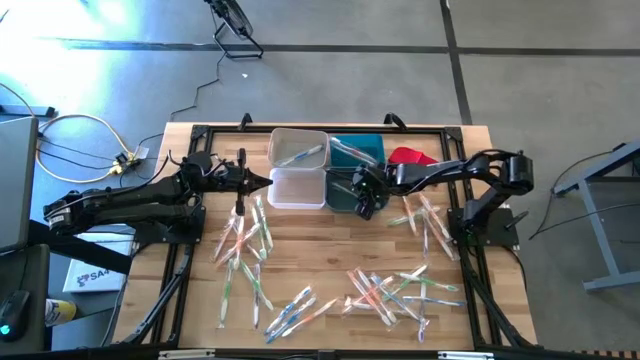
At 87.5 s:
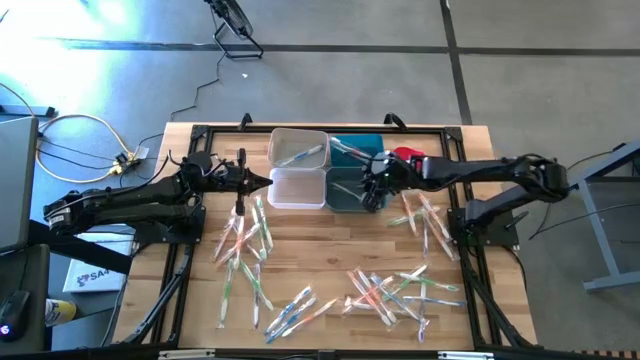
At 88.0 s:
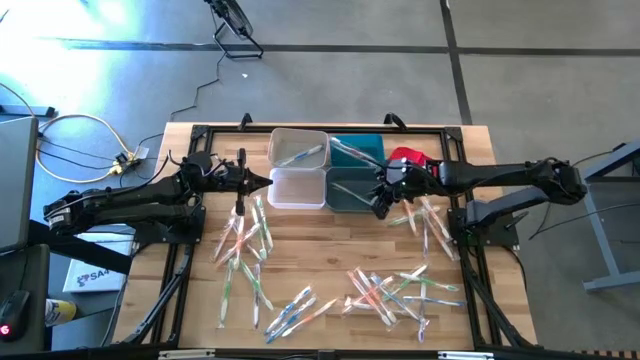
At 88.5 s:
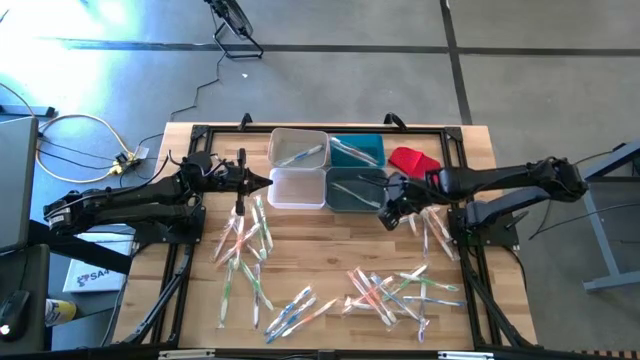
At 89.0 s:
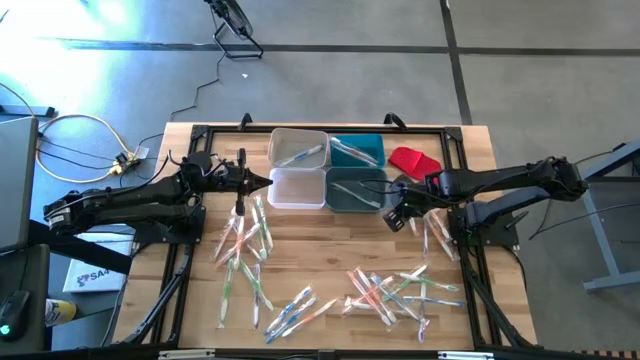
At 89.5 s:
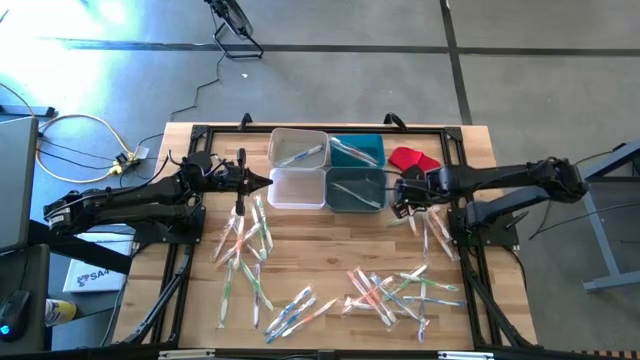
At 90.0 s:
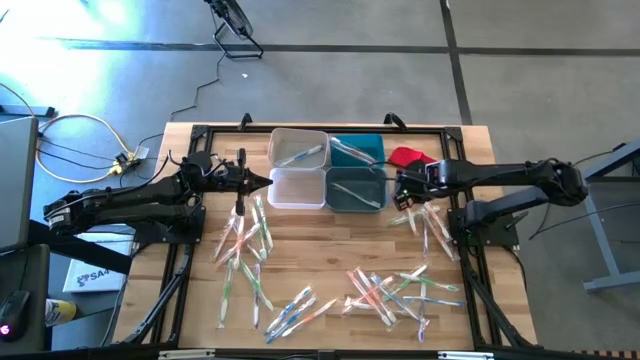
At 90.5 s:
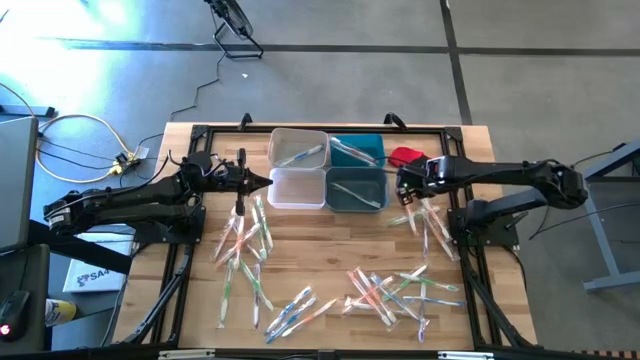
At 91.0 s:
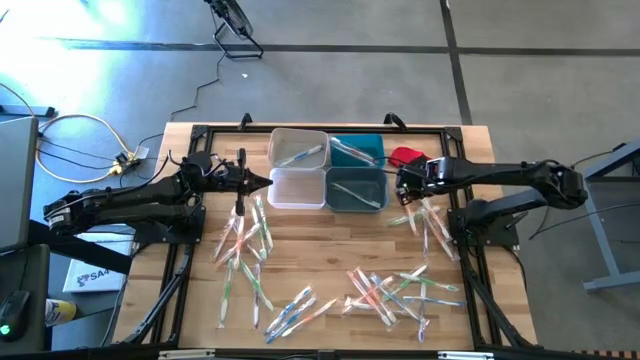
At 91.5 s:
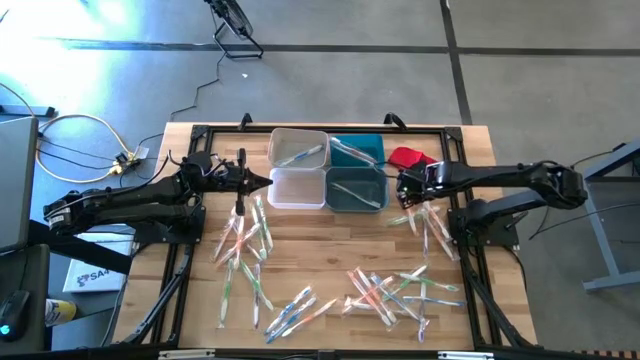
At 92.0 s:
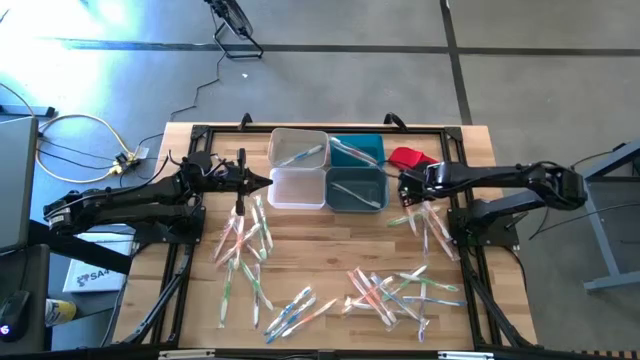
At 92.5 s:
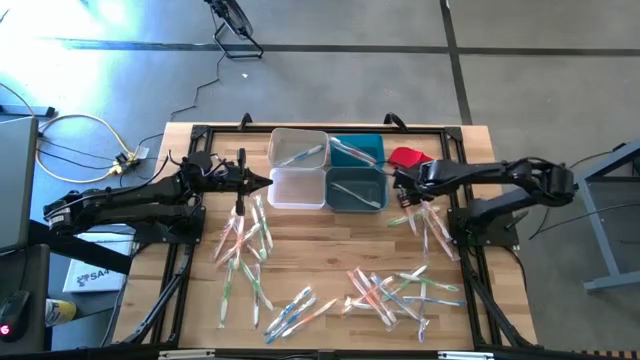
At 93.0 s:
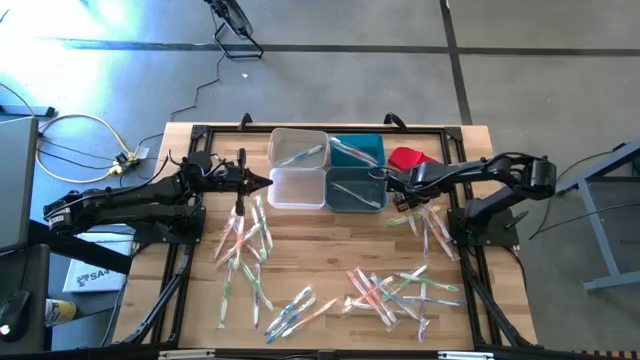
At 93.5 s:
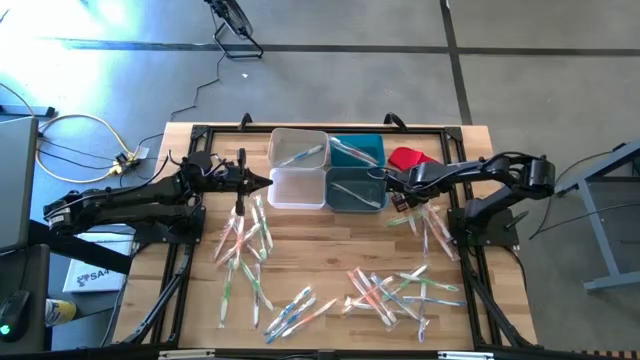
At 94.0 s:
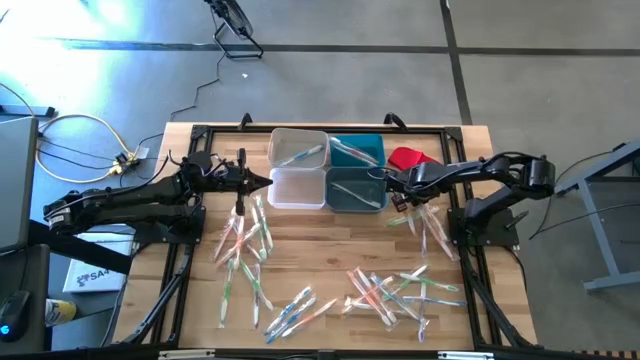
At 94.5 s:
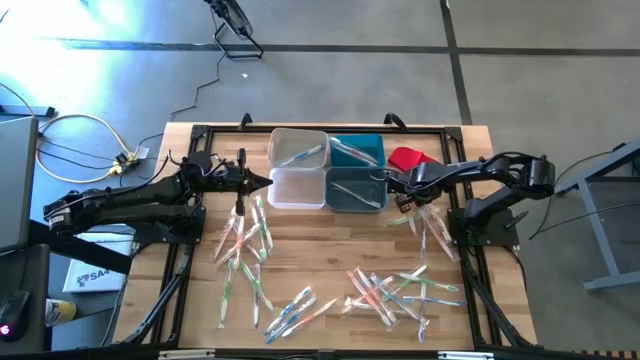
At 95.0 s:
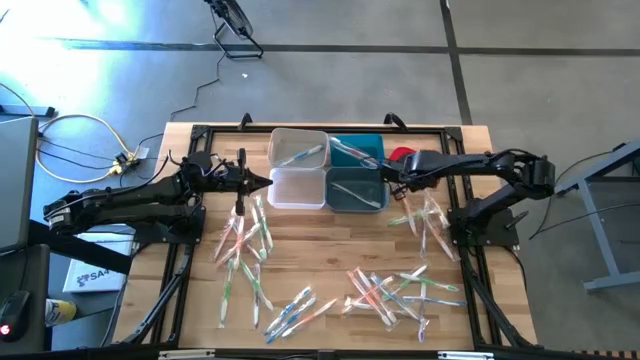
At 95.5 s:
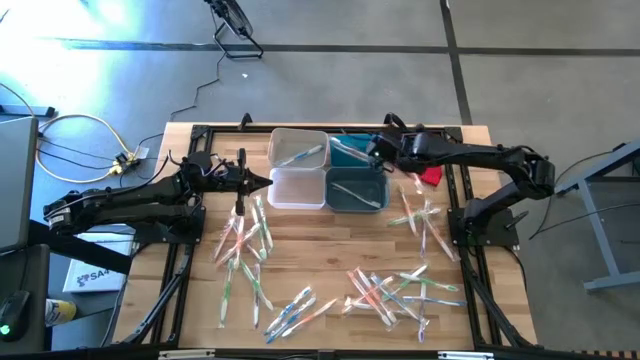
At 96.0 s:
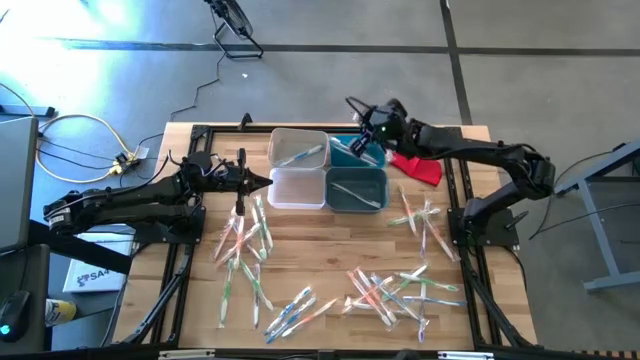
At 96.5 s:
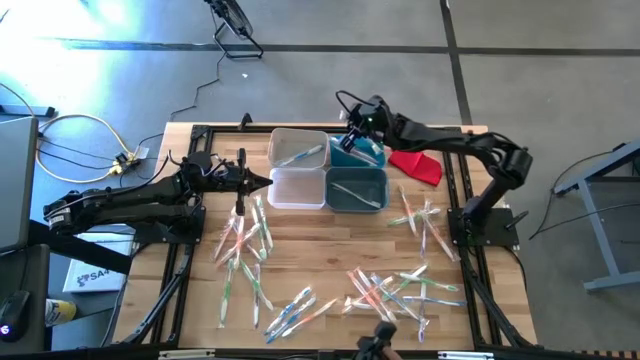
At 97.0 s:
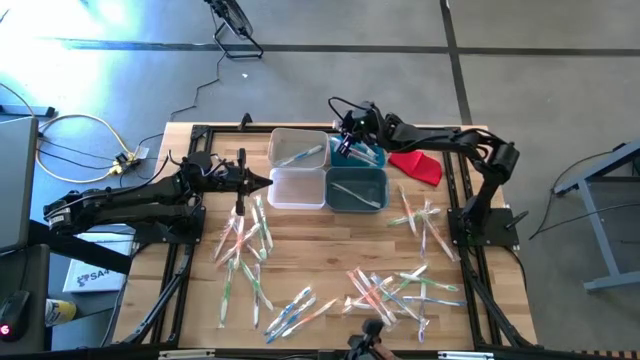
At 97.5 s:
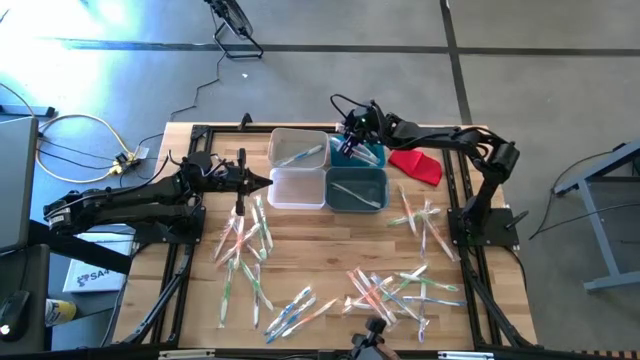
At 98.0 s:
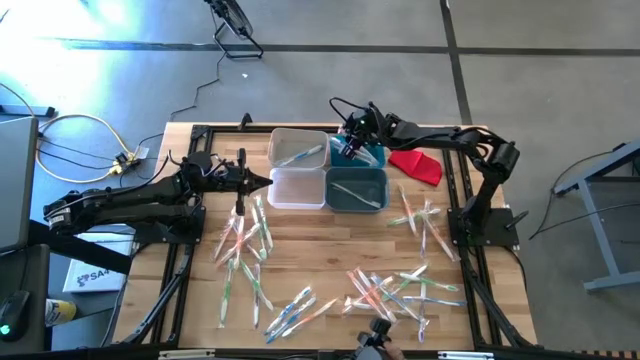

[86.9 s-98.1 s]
Task: Pick & Place Toothbrushes
Put the orange toothbrush into the blue bin

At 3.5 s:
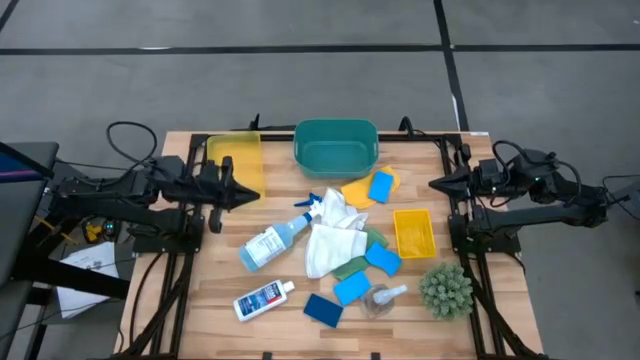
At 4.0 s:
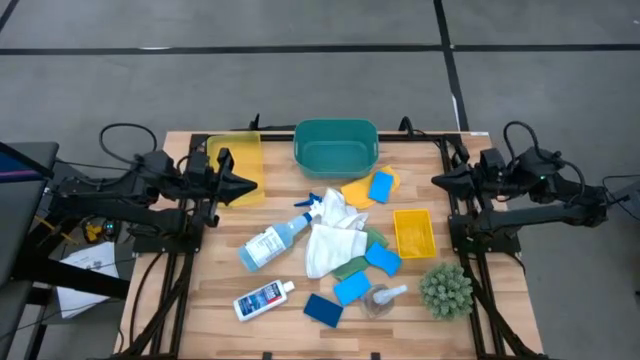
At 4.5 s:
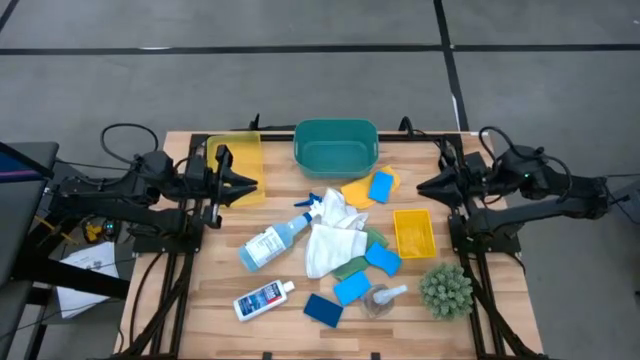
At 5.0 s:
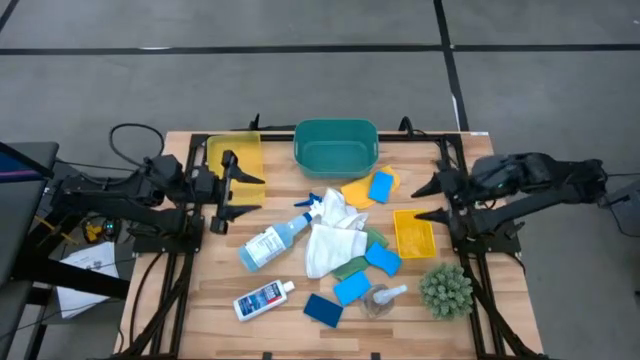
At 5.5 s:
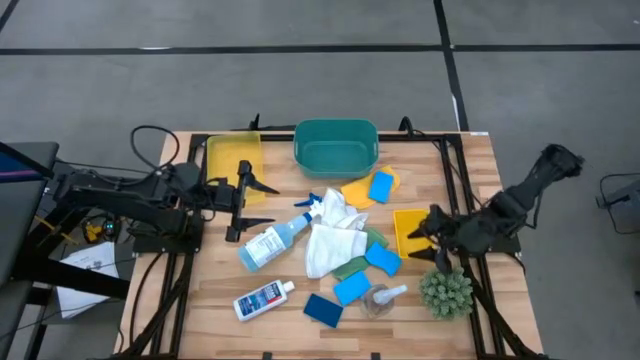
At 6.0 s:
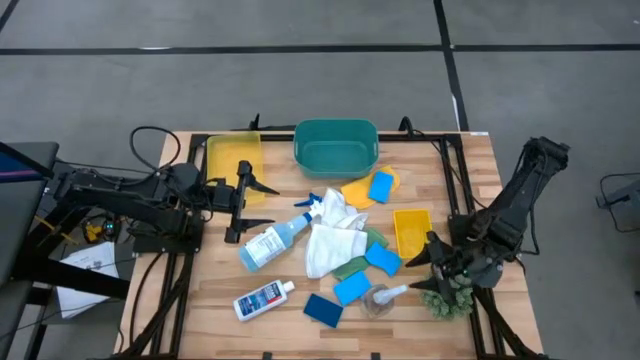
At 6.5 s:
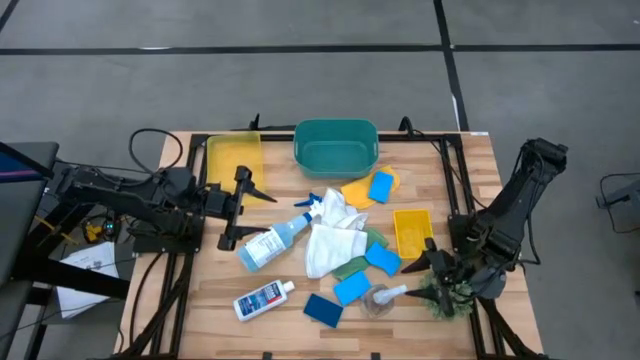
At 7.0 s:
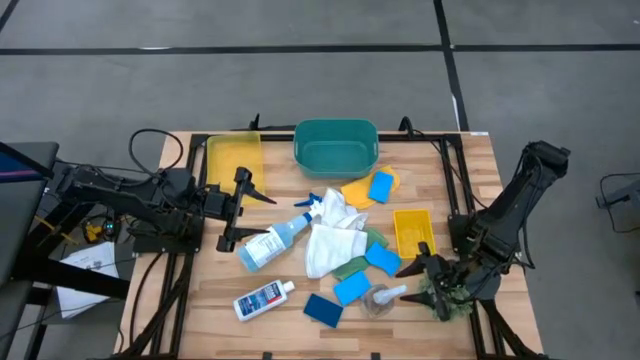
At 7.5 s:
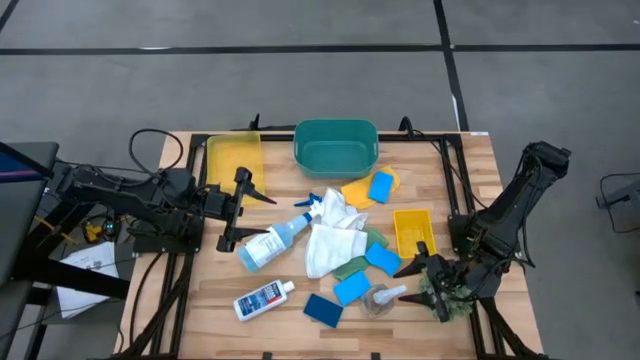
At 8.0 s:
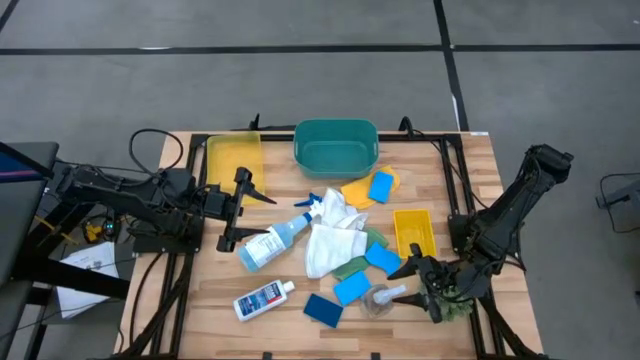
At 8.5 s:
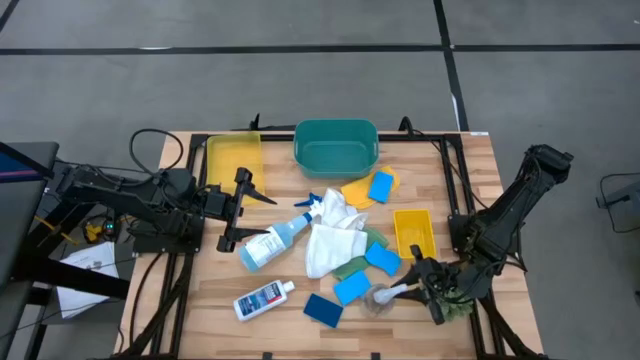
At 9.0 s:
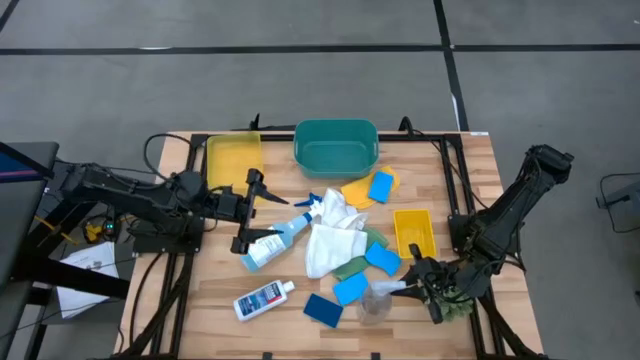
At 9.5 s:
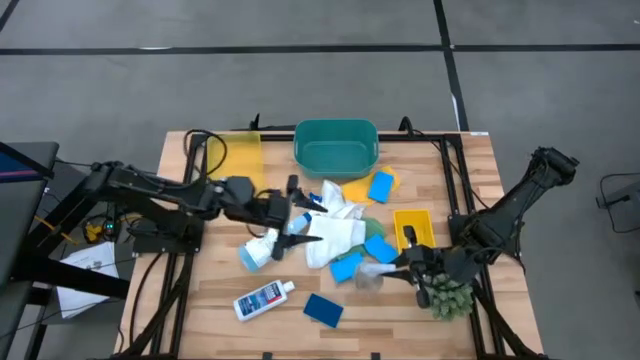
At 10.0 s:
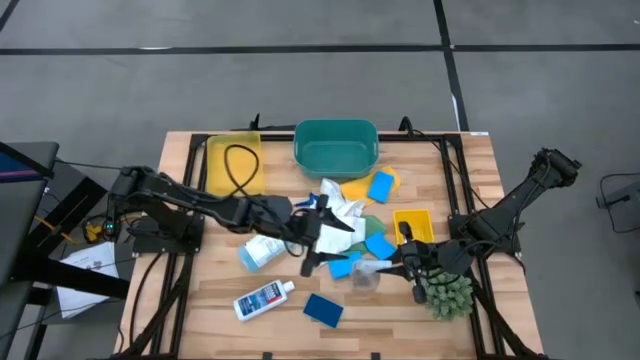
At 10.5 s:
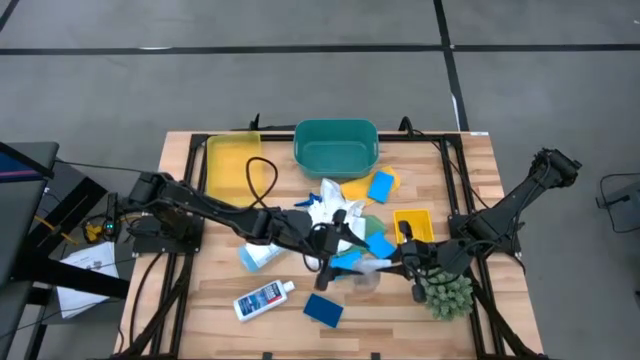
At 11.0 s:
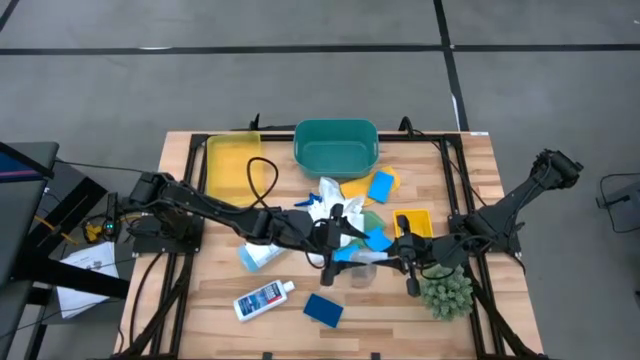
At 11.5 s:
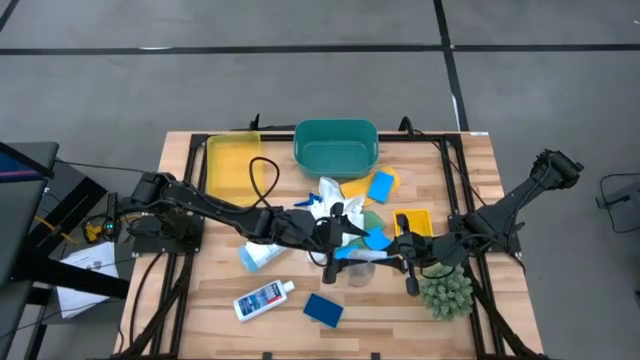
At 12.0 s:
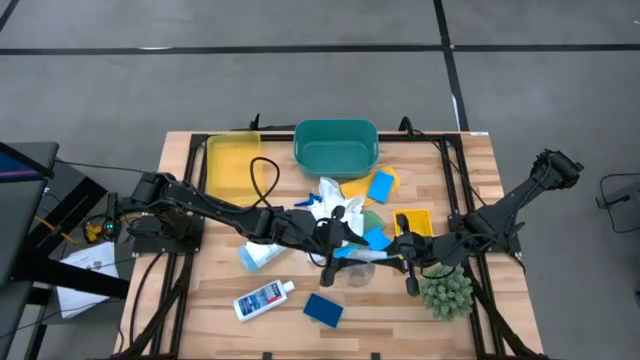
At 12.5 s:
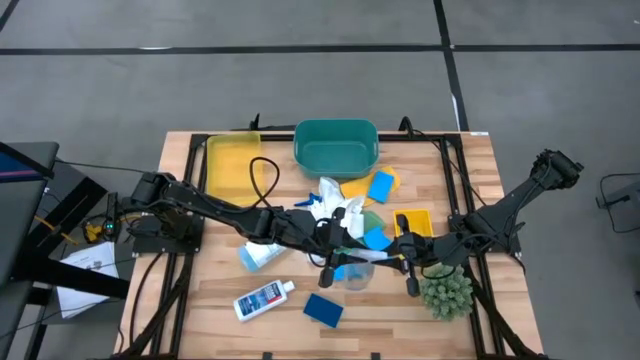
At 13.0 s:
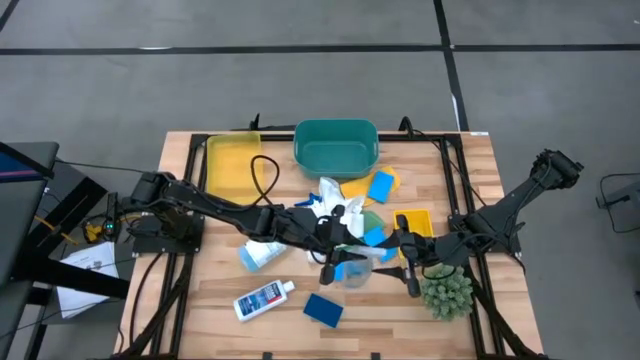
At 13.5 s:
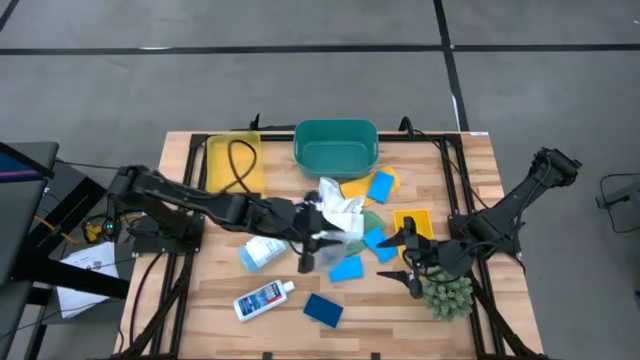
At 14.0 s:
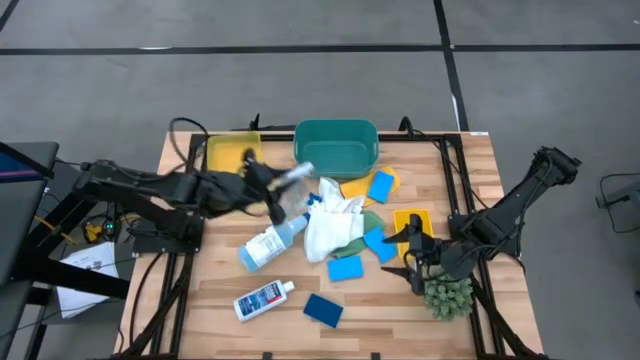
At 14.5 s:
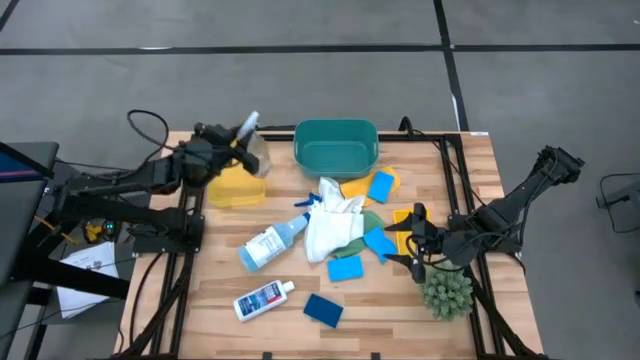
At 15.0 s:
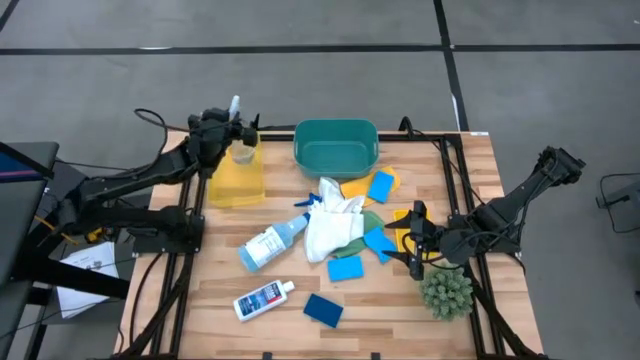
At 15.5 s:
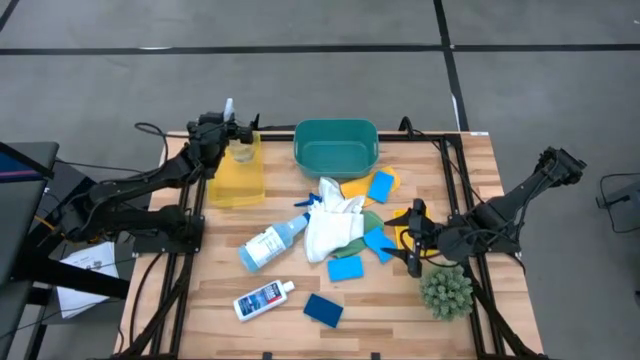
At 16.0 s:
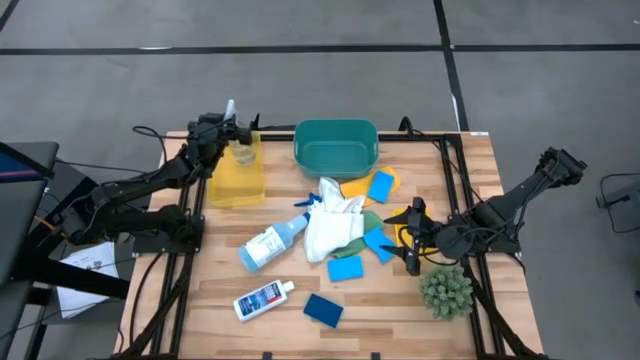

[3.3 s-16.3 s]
Task: Pick & Place Kitchen Items
Put the transparent spray bottle into the left yellow bin
